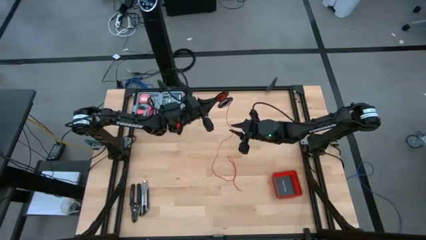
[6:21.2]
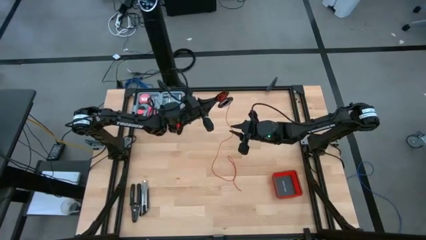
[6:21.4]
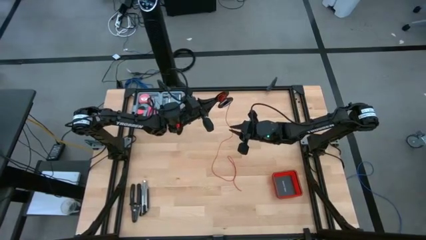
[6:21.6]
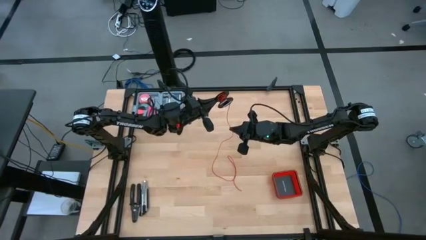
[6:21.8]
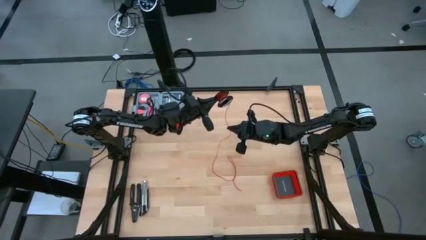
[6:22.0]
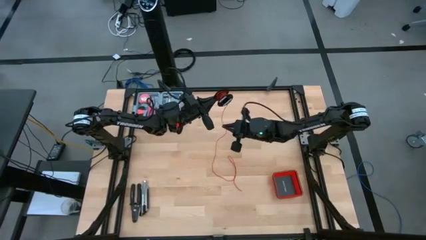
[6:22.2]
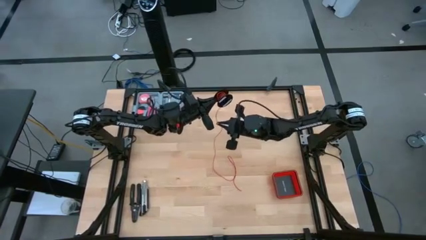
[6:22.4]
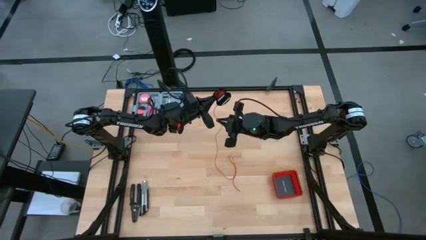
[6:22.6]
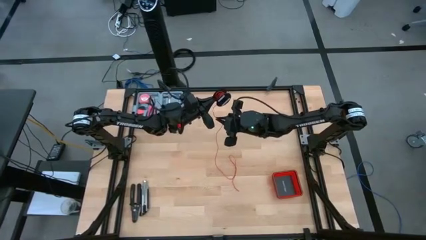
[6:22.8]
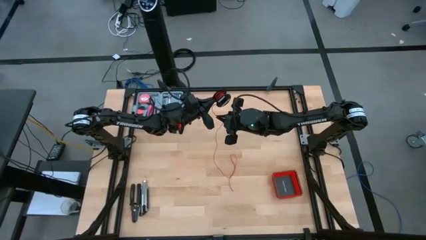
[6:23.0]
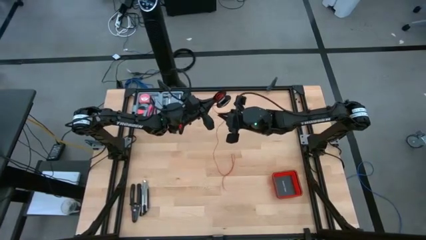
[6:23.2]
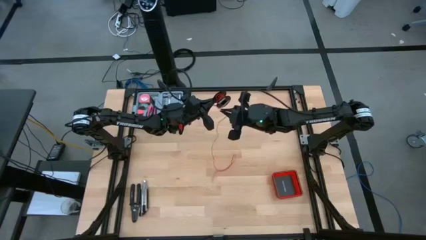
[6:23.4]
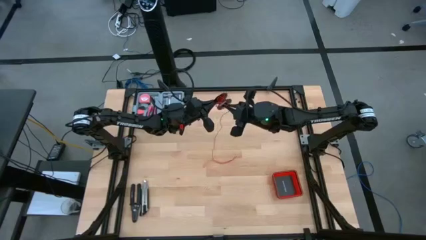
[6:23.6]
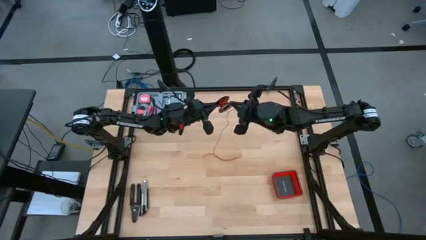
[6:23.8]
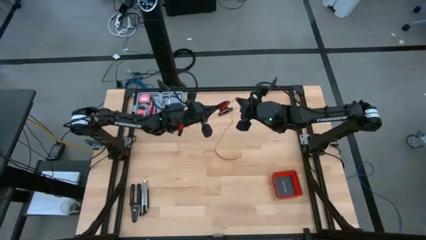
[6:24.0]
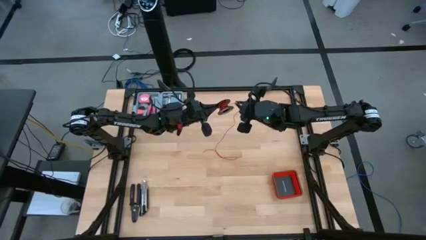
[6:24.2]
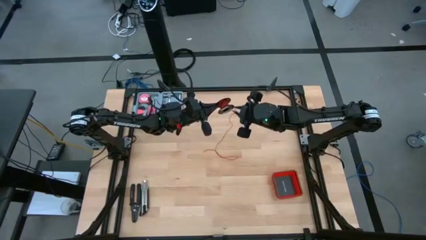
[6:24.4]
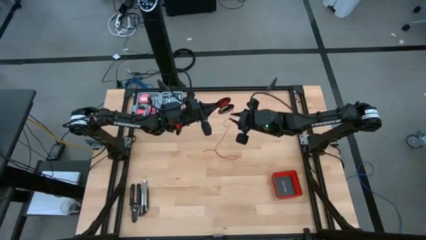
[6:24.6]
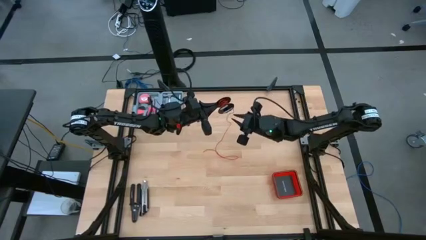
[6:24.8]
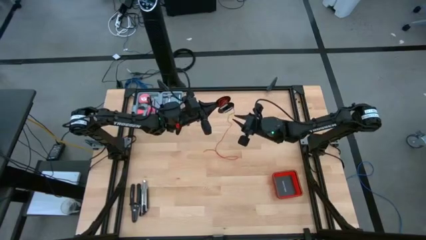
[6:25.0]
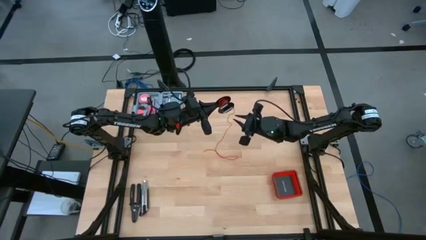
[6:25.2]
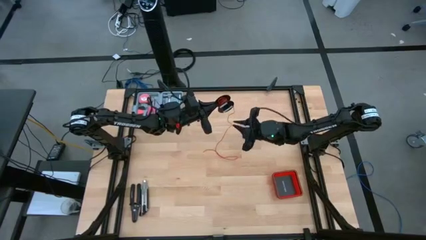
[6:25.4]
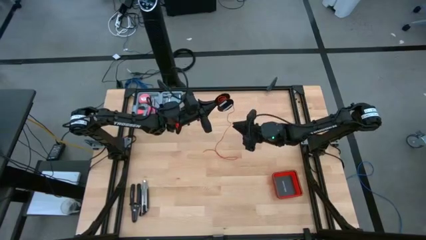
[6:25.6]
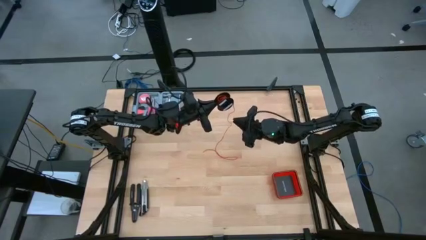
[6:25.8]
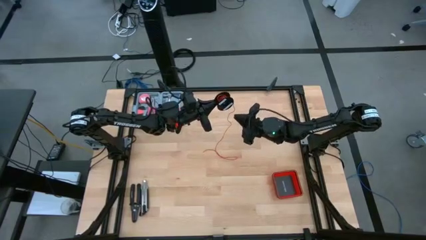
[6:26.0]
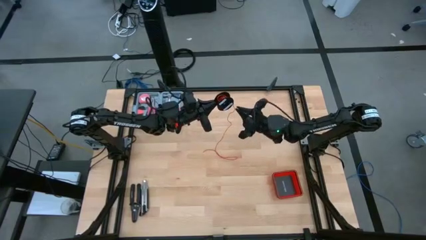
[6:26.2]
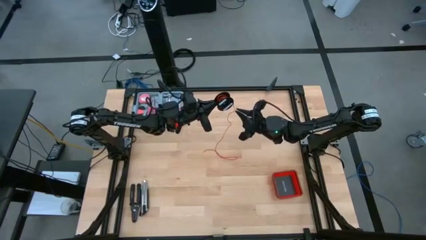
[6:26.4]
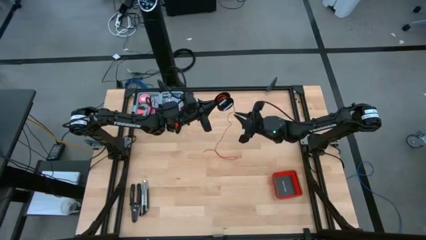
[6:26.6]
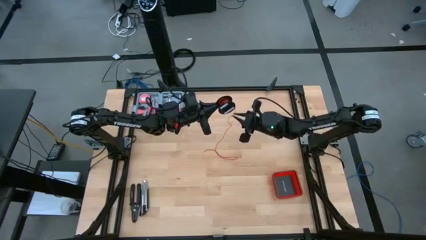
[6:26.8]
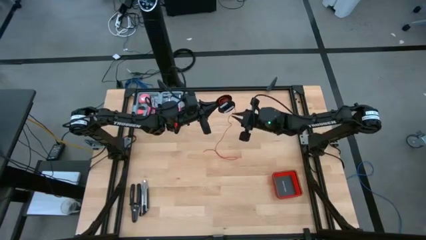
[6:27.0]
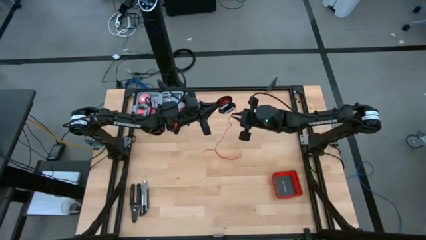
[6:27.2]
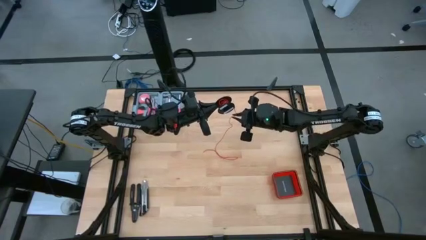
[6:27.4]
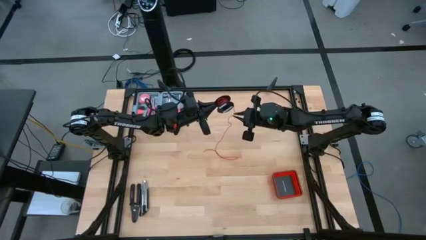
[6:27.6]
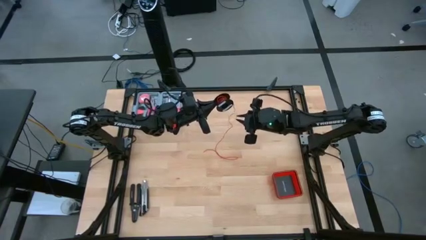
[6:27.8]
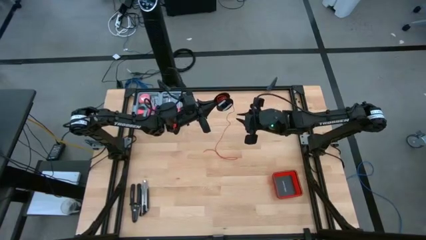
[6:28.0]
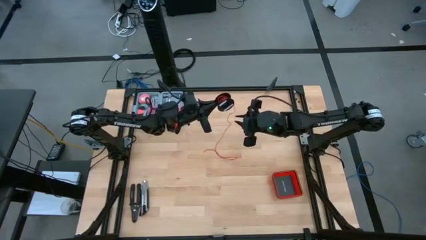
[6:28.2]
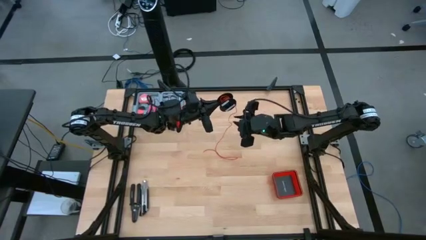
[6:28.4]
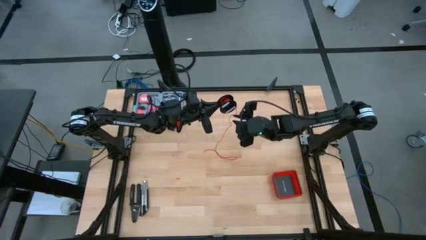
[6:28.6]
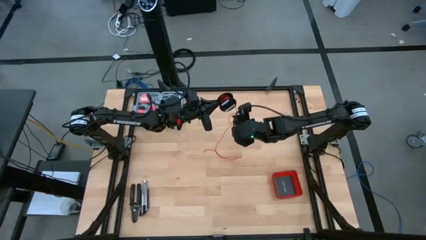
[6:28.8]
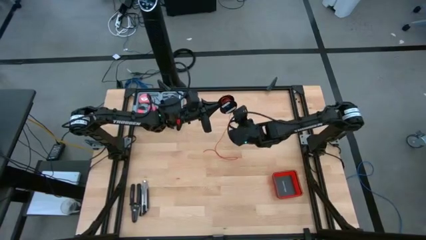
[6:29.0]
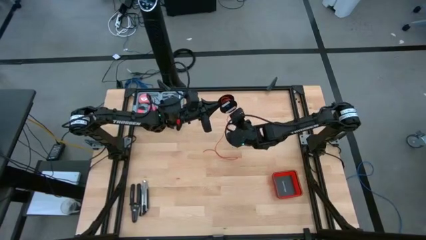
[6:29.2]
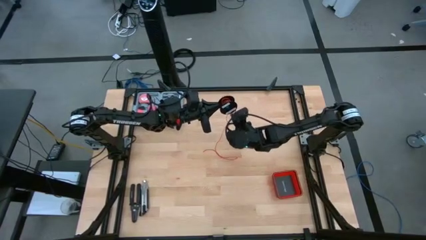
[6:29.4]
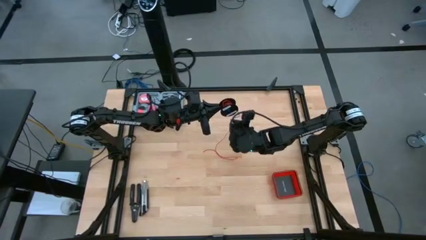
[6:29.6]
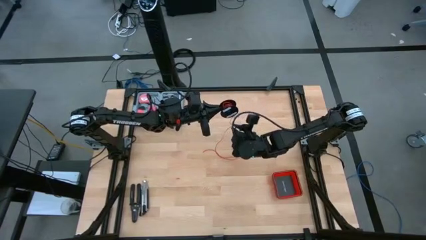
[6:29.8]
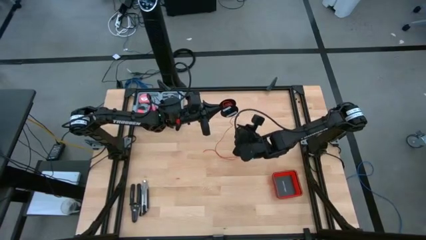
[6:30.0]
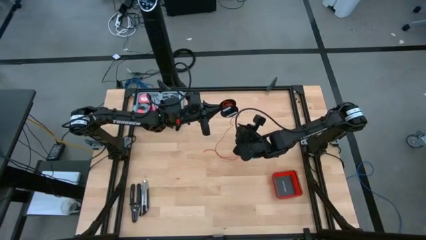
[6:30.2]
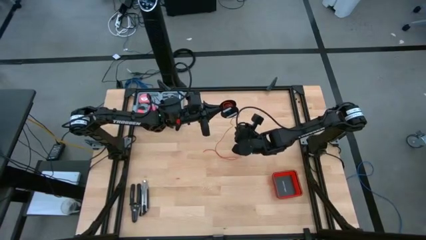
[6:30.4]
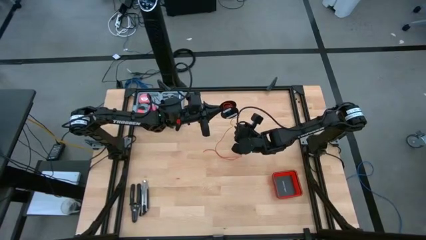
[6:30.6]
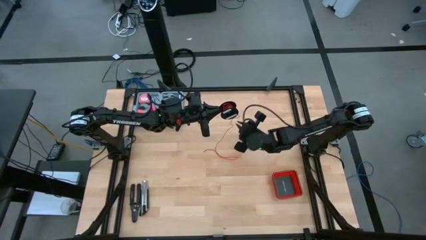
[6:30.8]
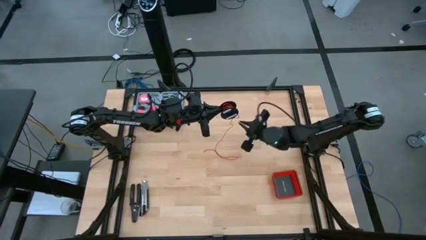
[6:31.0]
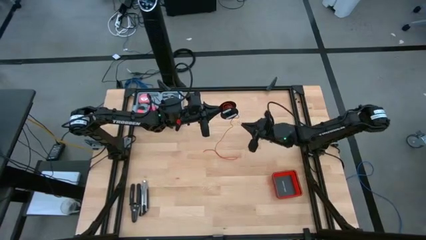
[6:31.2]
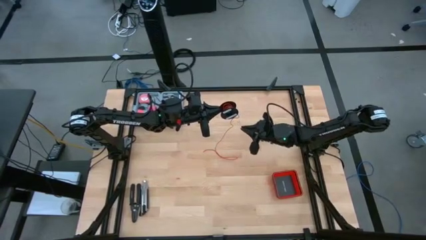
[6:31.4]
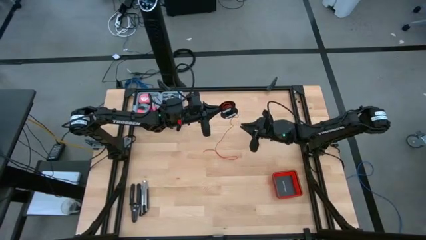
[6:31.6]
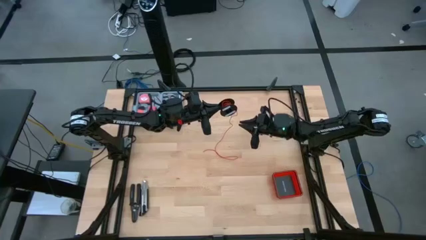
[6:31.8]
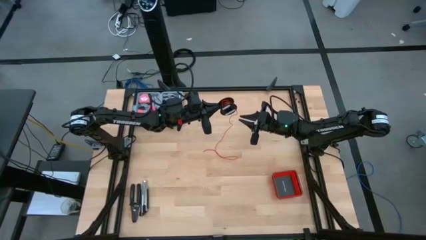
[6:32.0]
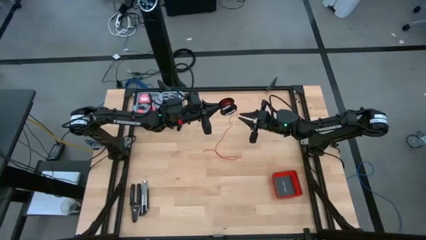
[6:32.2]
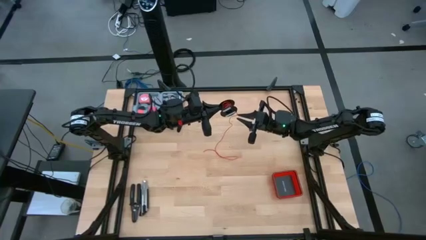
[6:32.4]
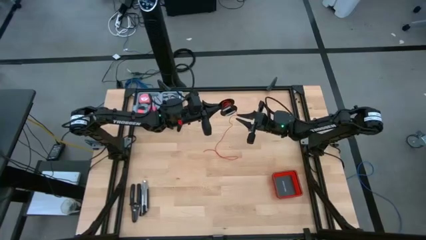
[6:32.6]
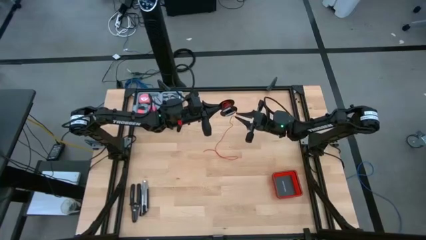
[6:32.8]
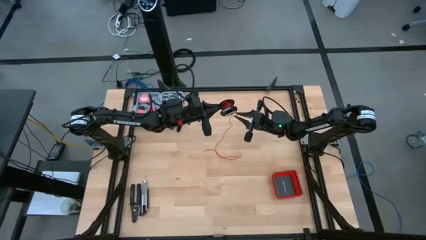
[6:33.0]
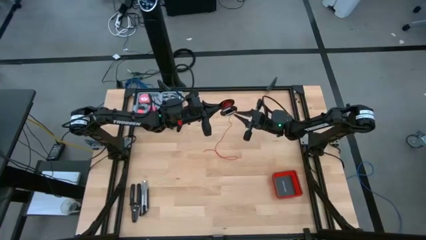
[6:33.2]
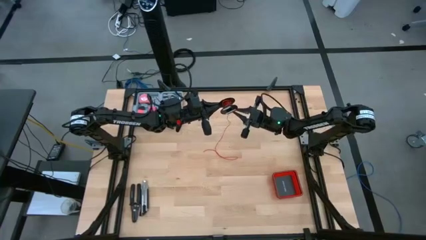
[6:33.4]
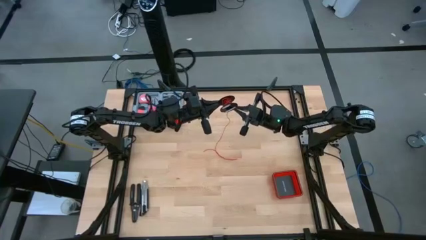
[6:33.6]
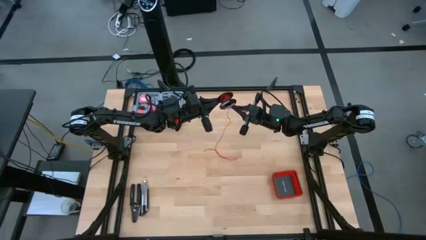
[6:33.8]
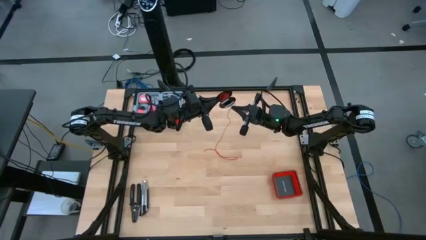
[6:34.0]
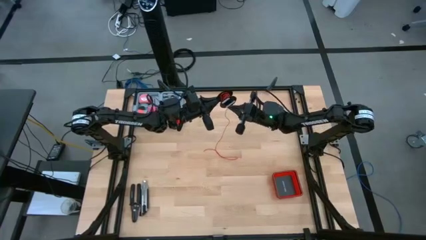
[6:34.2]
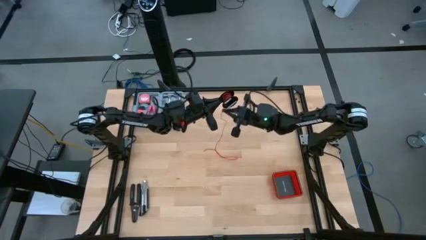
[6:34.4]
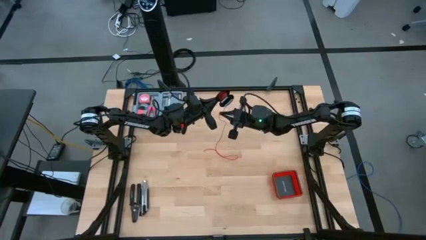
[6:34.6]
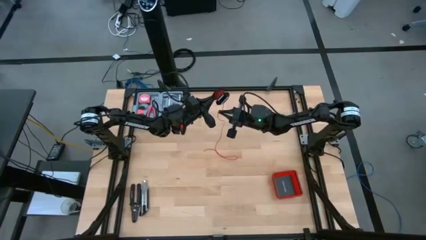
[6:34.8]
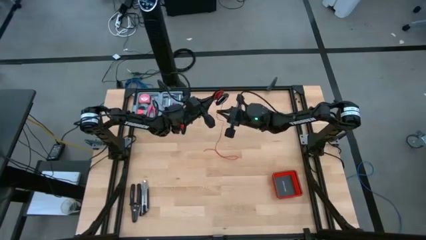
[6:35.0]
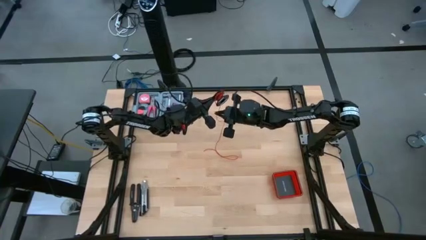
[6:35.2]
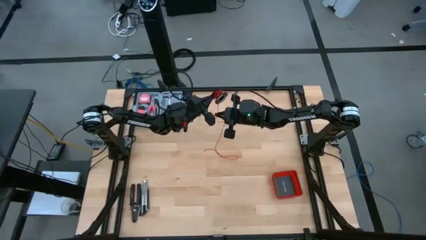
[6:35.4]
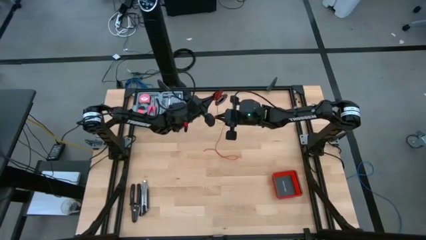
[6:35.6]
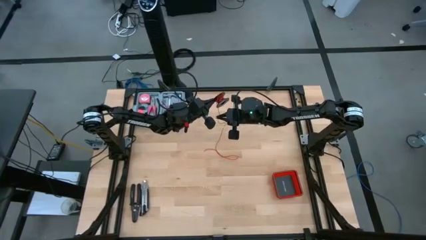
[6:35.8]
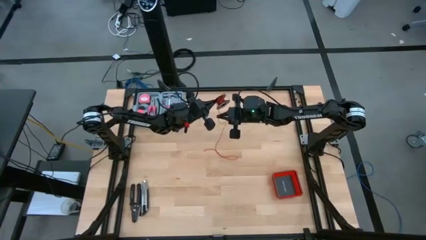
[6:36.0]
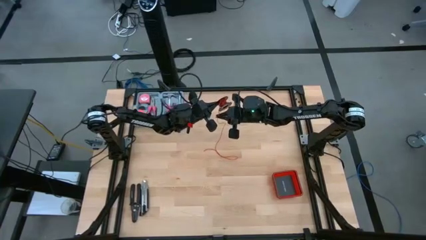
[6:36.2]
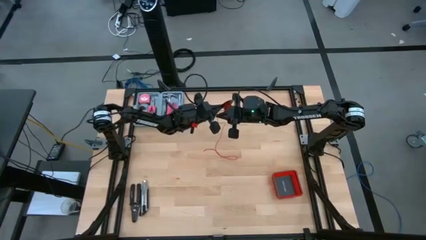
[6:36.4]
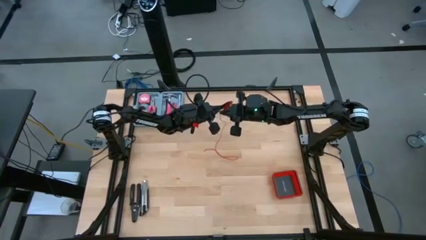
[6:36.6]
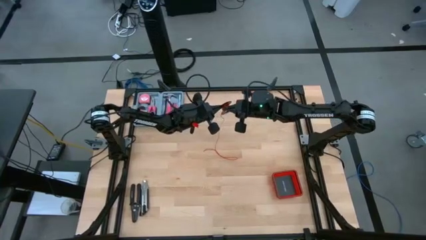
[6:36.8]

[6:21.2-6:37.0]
Task: Coil cords
Coil the red wire onto the spool
